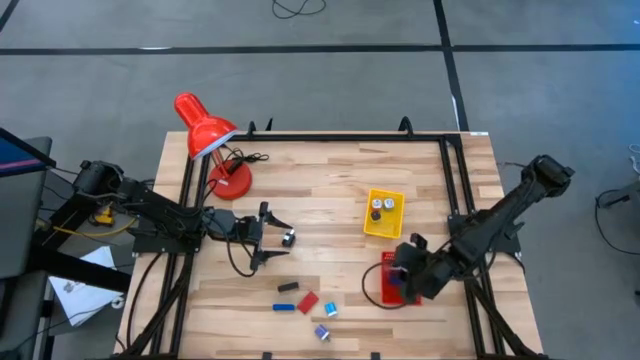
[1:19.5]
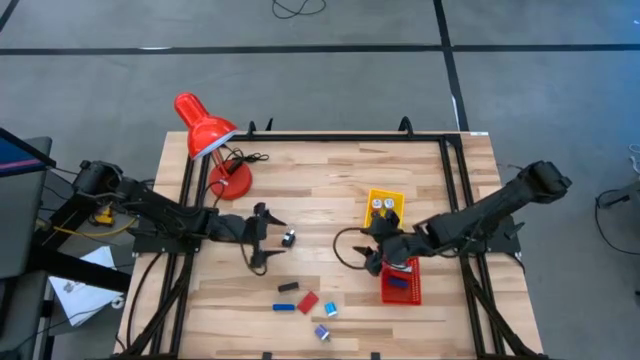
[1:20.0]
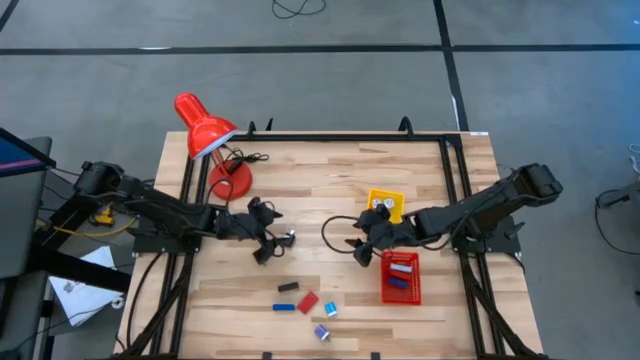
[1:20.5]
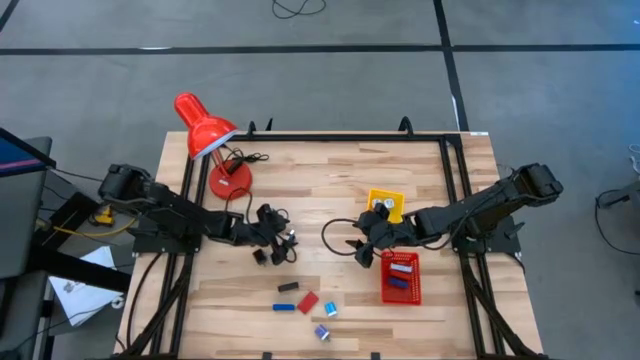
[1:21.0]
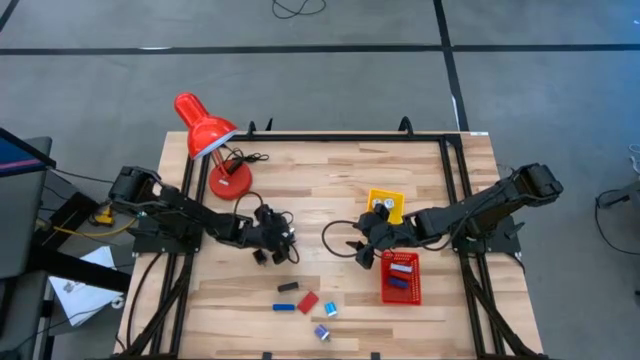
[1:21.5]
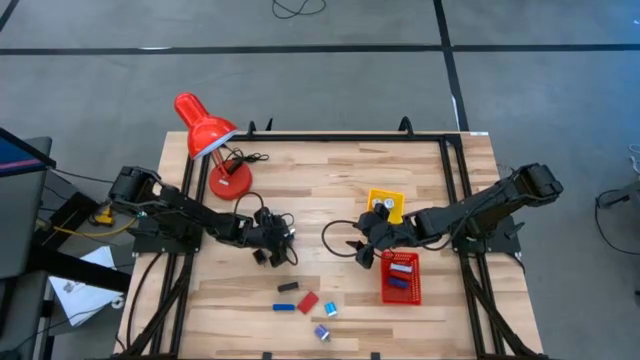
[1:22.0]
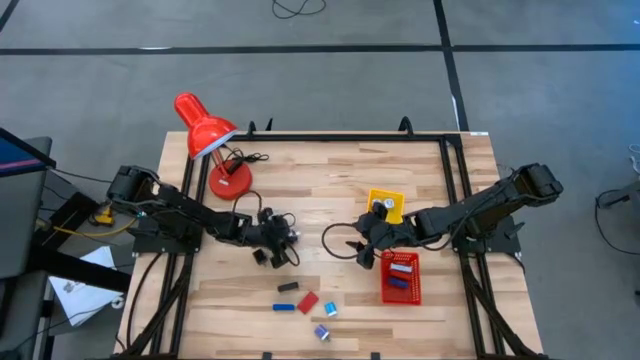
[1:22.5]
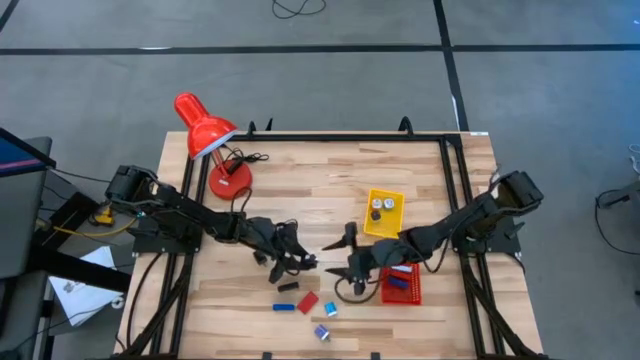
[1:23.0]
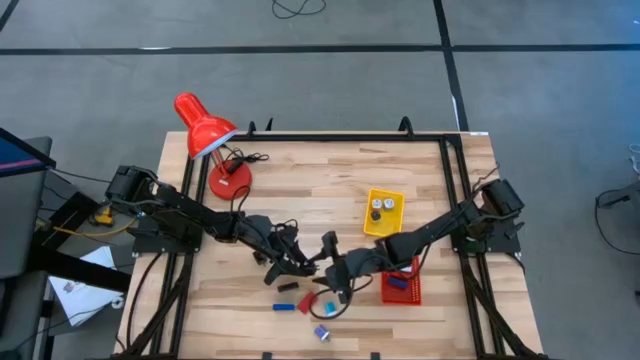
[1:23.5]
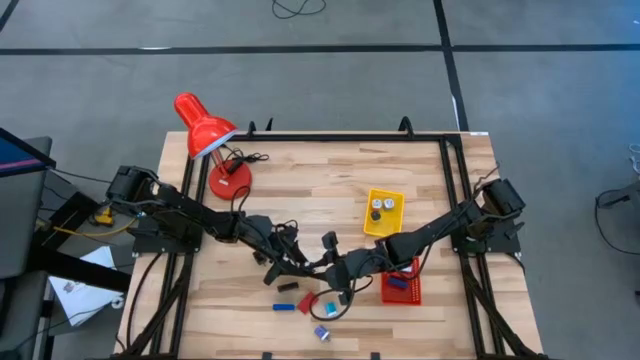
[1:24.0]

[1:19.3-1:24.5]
Task: Pick & Place Office items
Put the top black charger adapter into the yellow bin

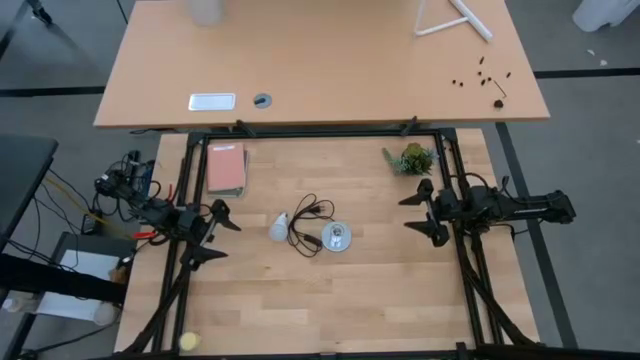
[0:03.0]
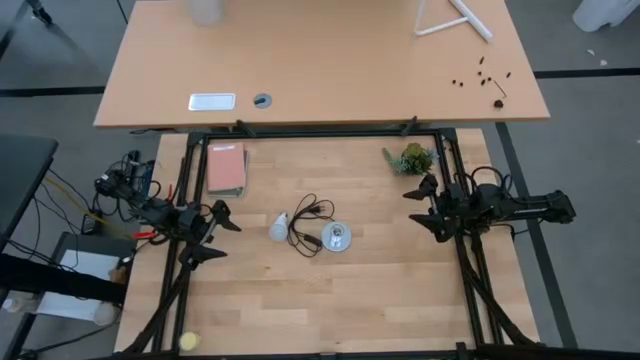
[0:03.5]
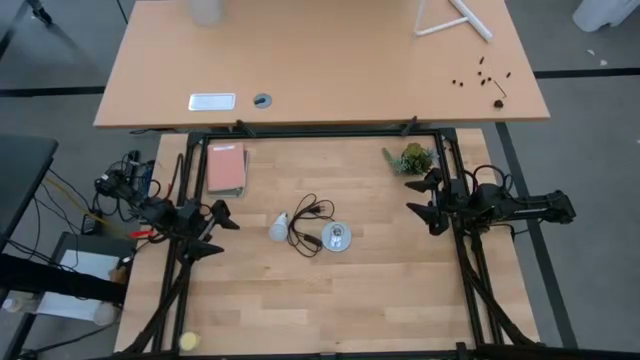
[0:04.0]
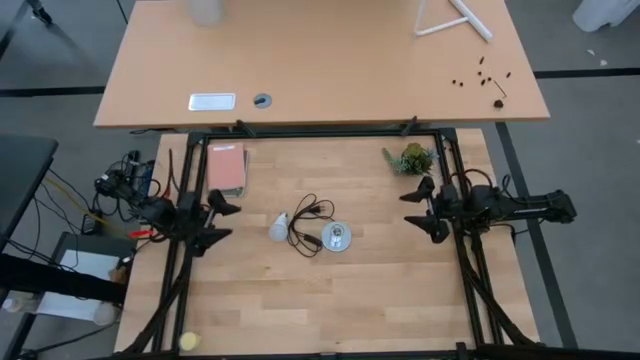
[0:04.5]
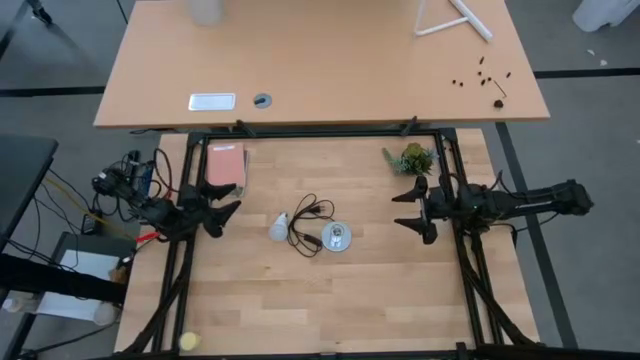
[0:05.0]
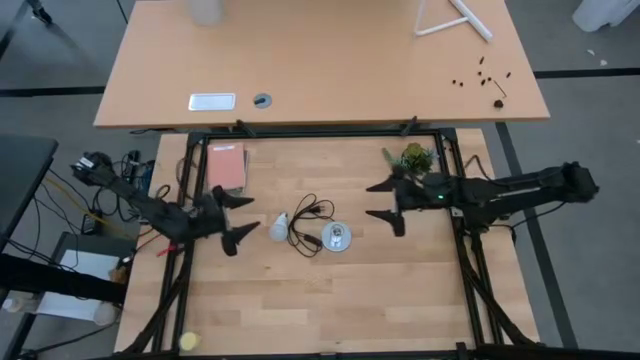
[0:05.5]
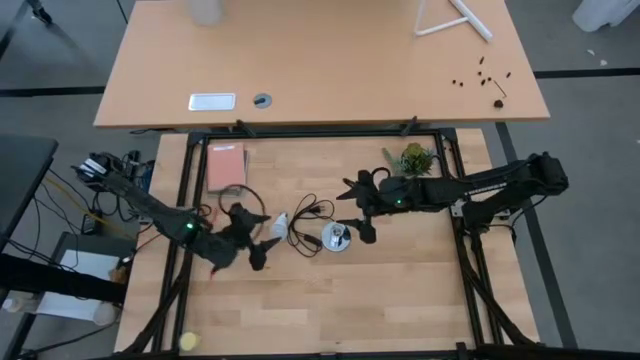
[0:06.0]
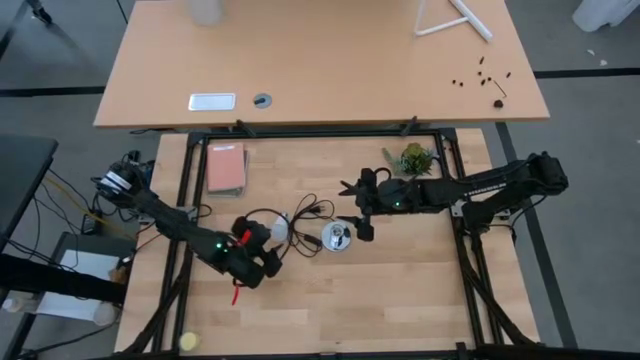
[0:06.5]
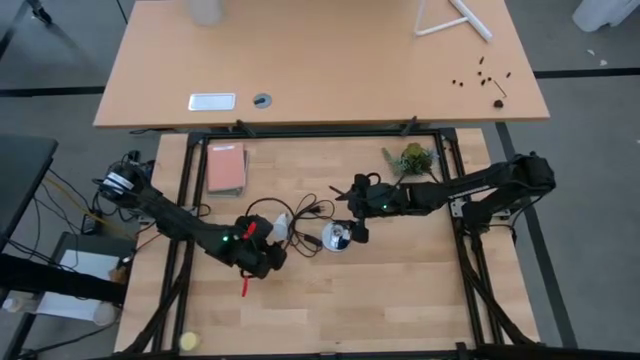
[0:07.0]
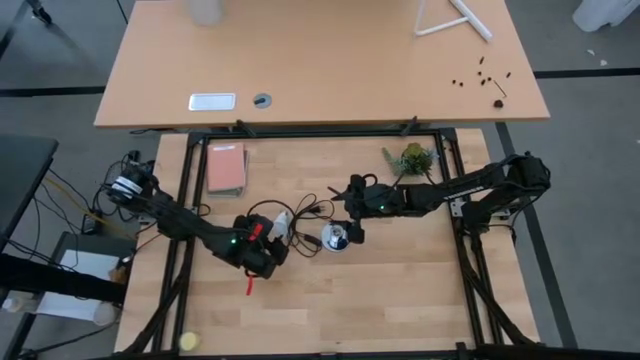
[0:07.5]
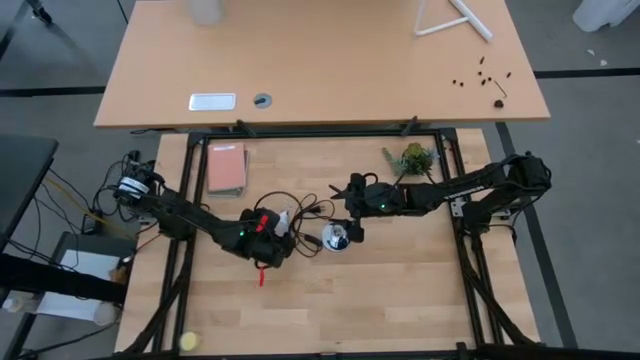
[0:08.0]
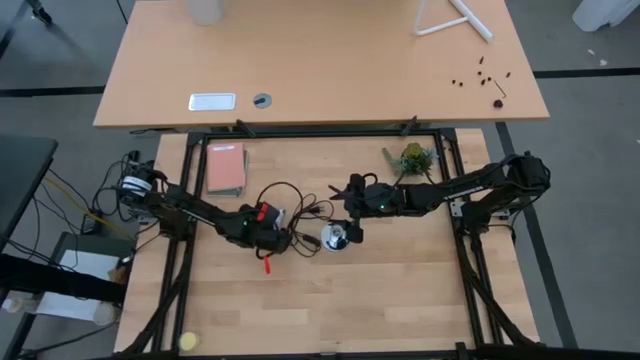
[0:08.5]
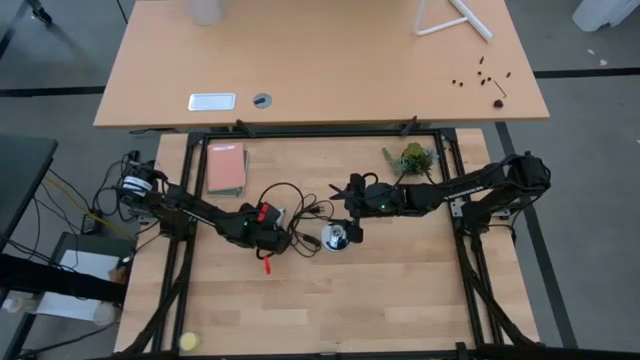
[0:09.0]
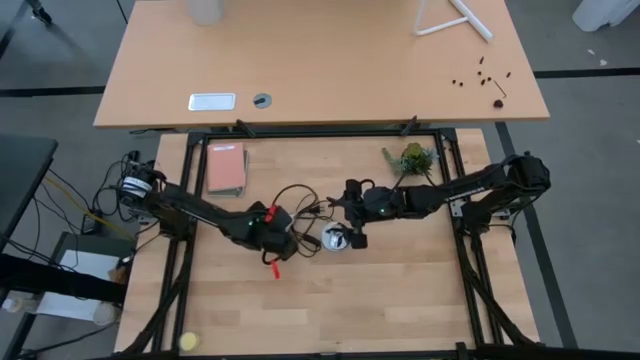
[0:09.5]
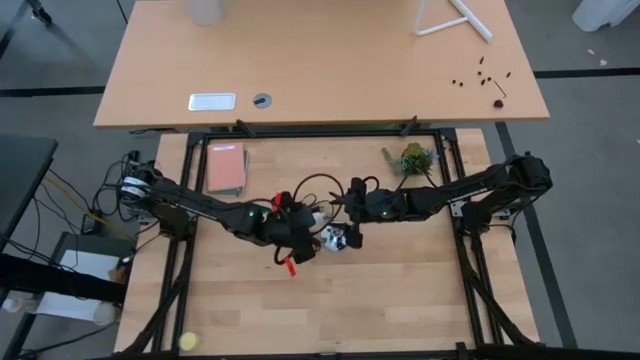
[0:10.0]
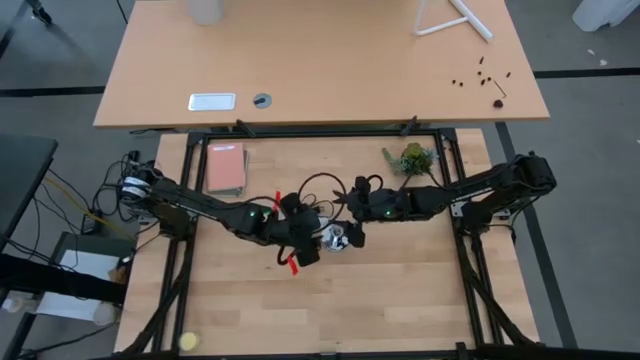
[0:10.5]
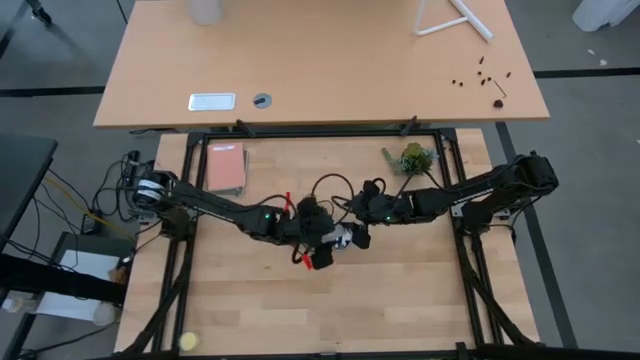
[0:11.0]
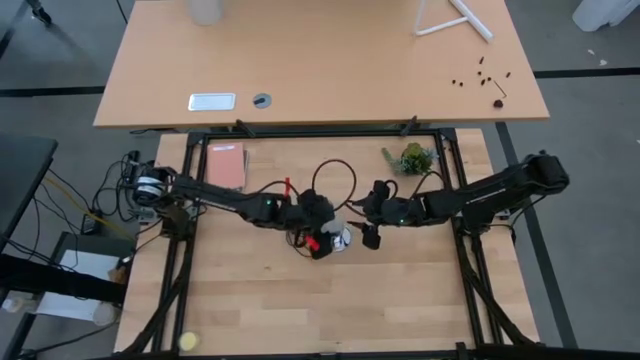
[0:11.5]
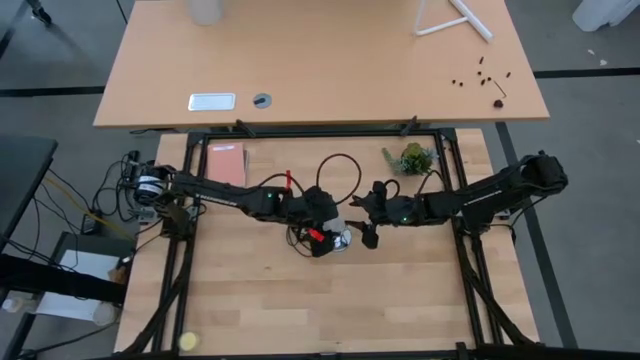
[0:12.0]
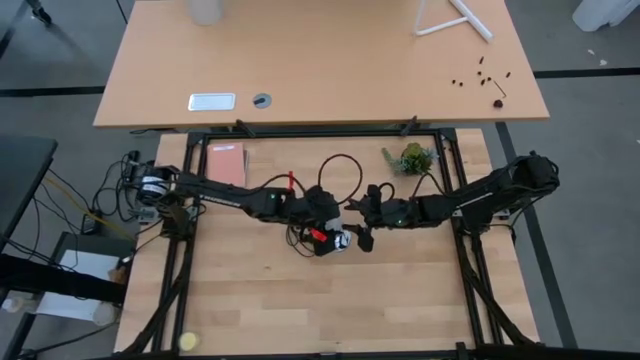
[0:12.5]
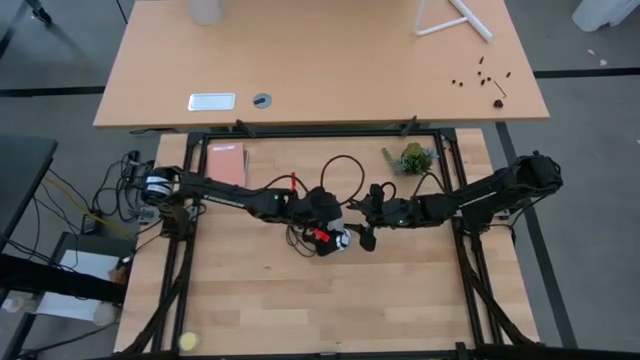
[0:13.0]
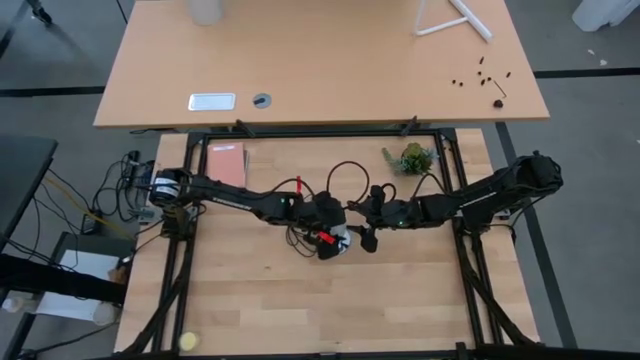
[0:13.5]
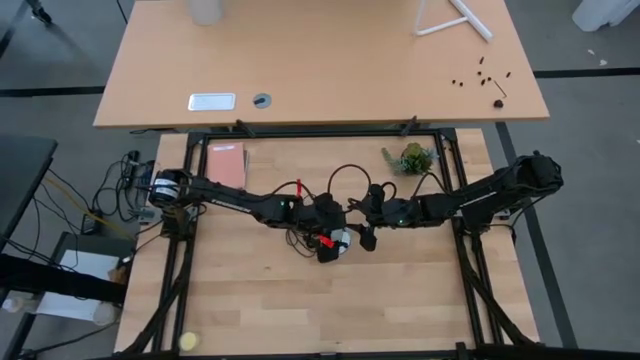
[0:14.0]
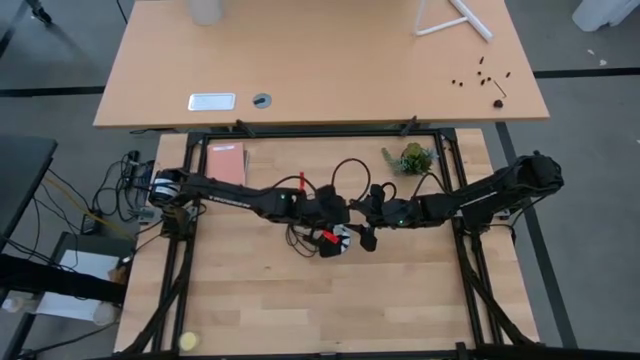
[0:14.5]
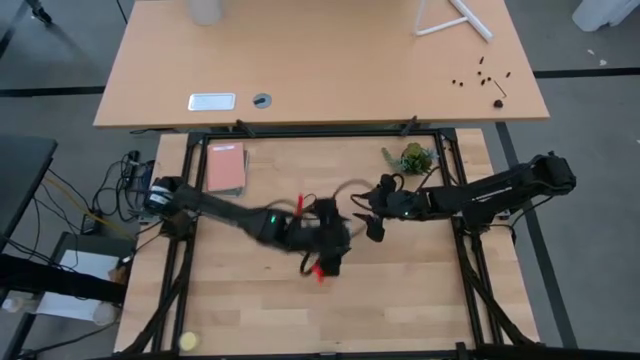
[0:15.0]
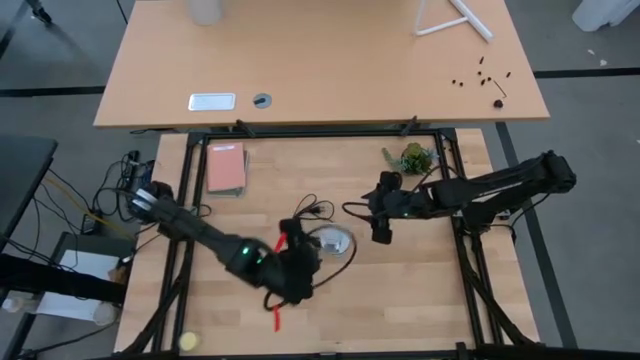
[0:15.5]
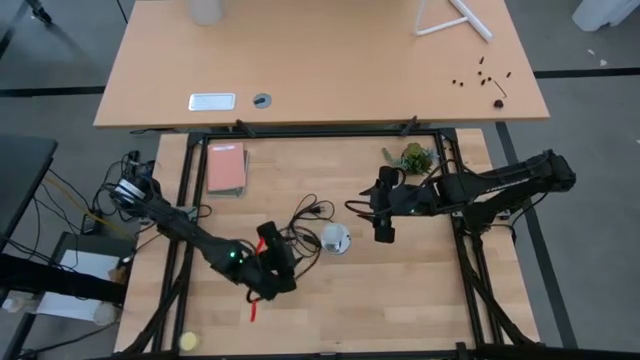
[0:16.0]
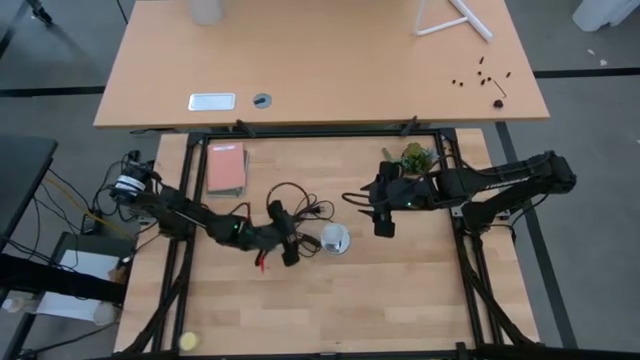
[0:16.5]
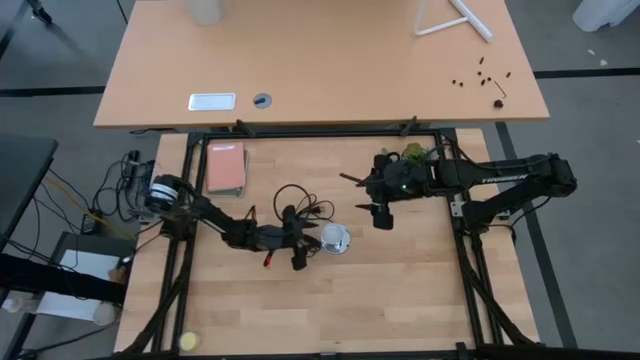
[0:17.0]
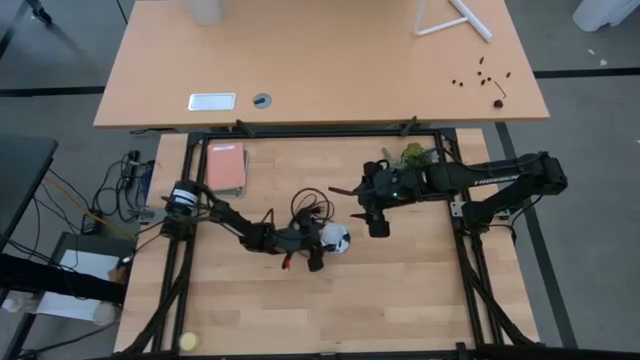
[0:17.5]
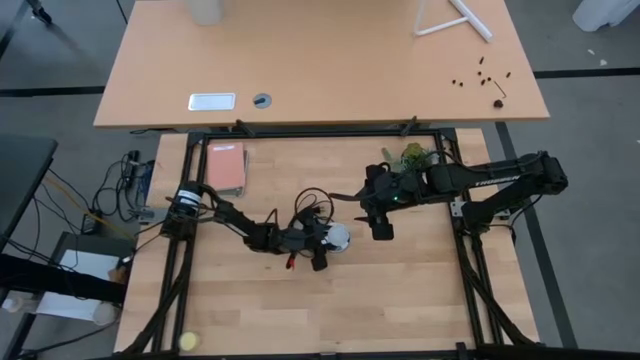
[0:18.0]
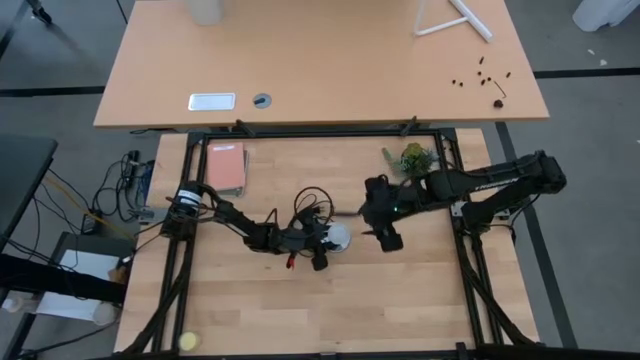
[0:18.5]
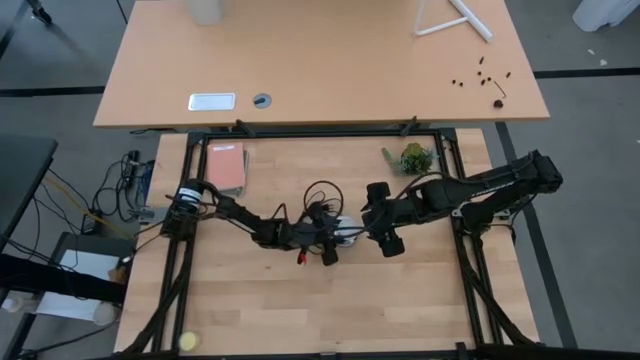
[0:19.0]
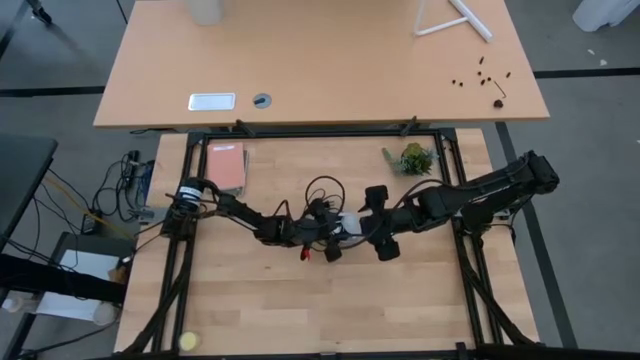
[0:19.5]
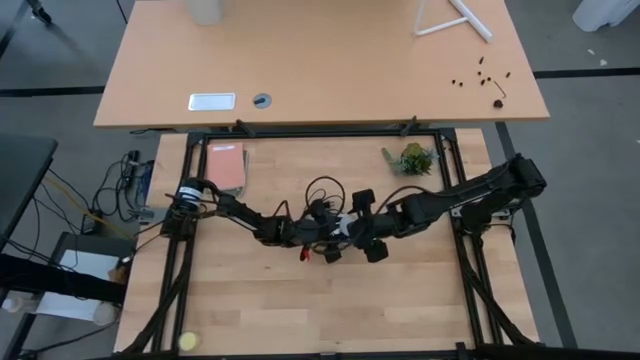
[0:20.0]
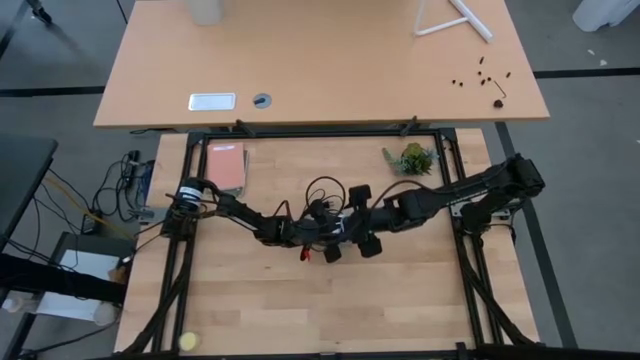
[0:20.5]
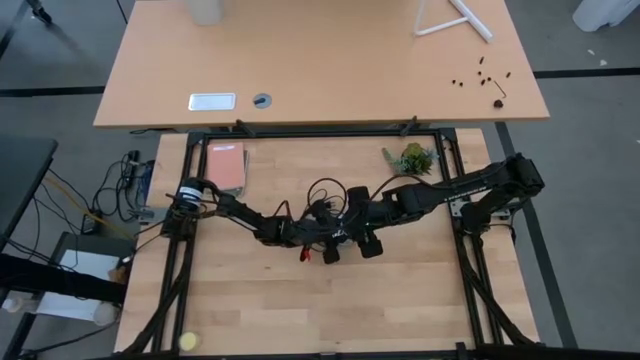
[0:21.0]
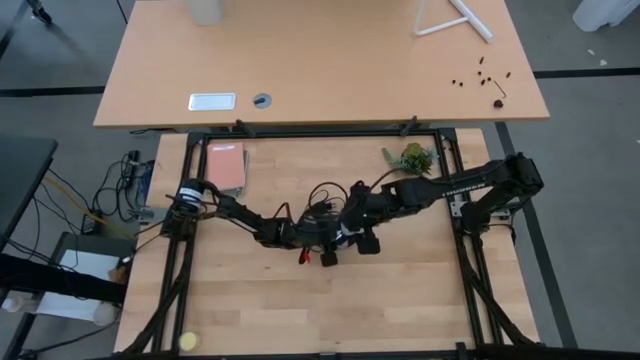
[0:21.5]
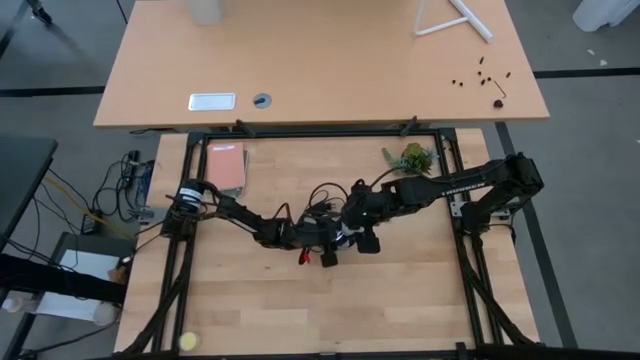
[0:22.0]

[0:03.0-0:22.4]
Task: Screw lightbulb
Insert the lightbulb into the lamp
